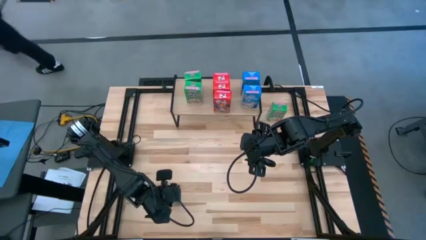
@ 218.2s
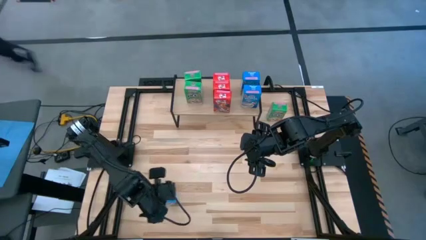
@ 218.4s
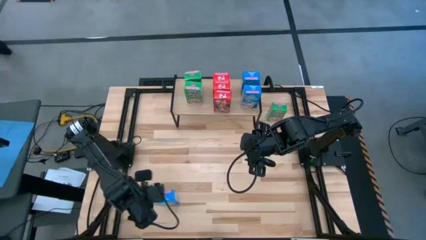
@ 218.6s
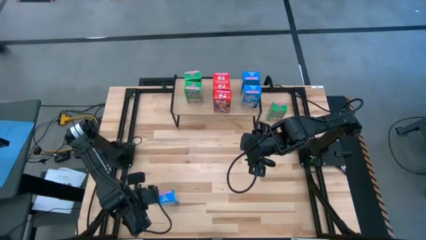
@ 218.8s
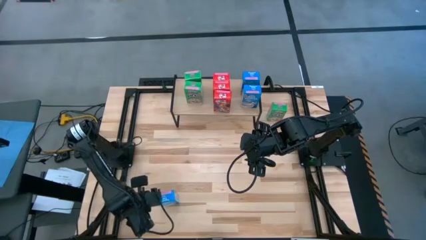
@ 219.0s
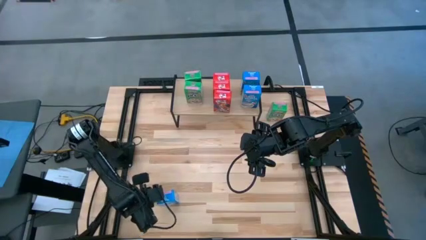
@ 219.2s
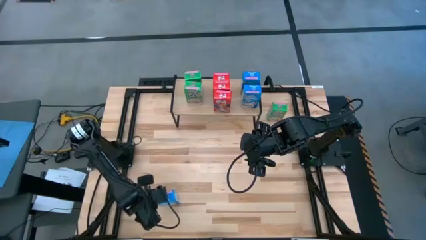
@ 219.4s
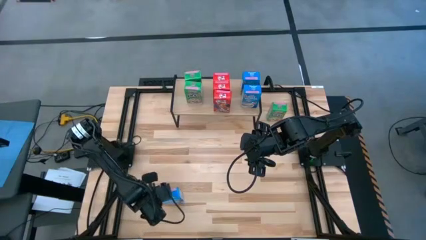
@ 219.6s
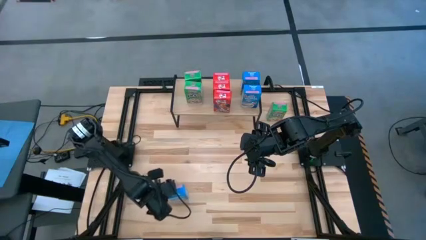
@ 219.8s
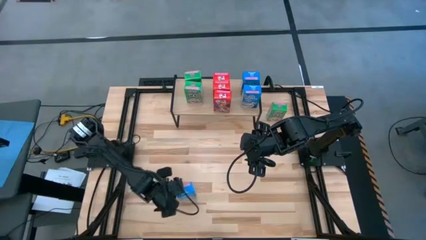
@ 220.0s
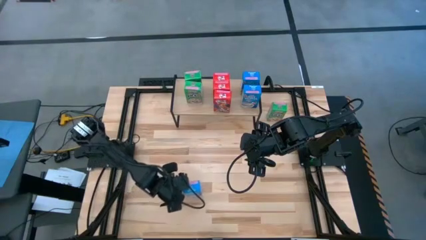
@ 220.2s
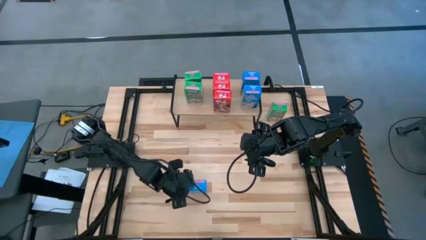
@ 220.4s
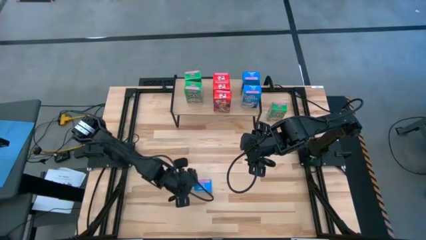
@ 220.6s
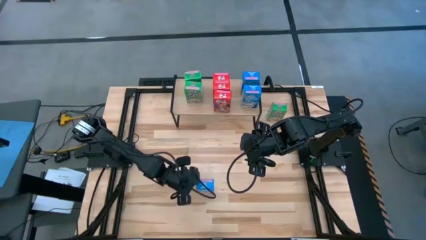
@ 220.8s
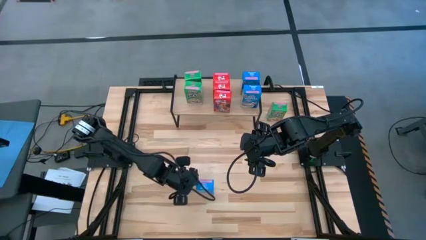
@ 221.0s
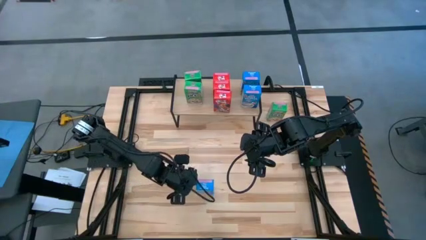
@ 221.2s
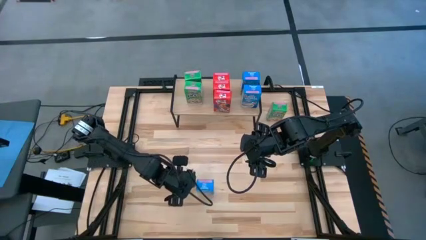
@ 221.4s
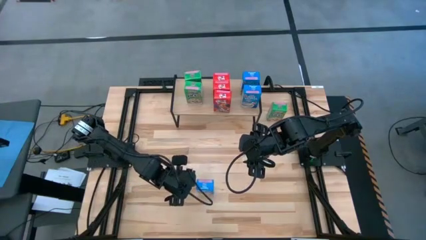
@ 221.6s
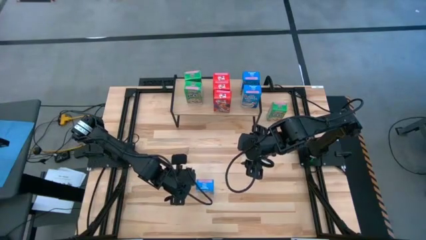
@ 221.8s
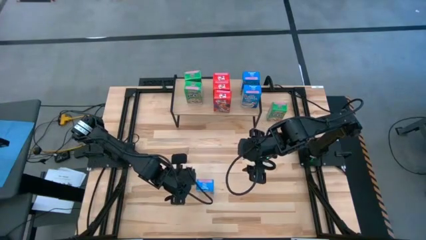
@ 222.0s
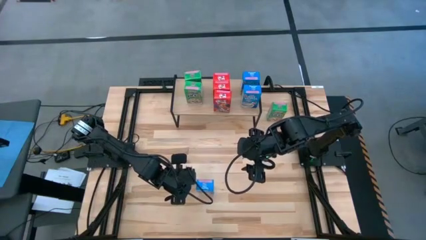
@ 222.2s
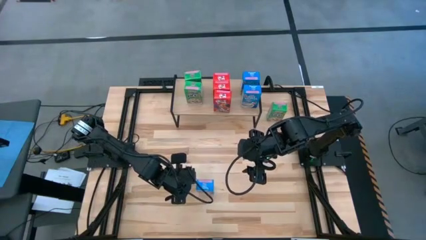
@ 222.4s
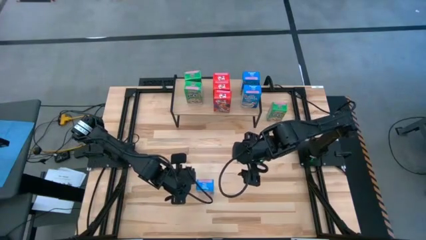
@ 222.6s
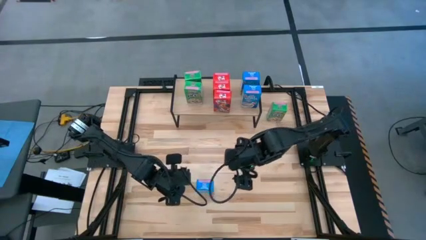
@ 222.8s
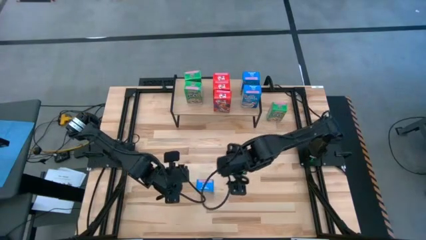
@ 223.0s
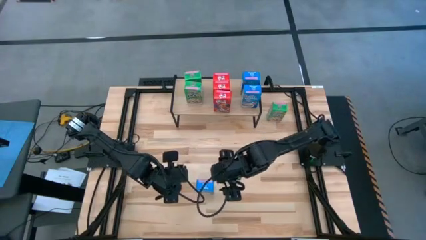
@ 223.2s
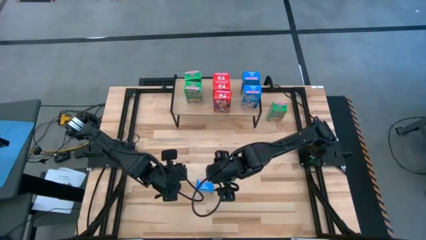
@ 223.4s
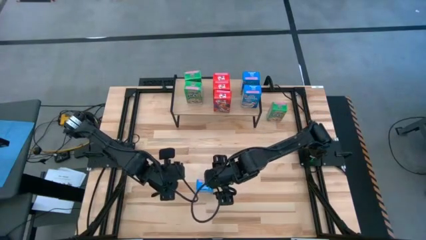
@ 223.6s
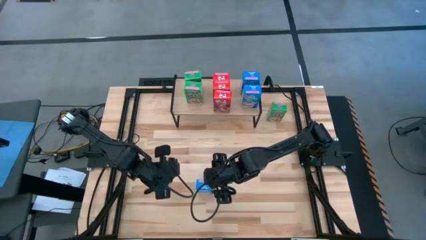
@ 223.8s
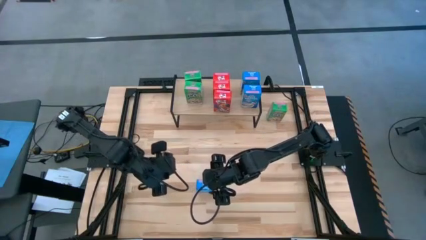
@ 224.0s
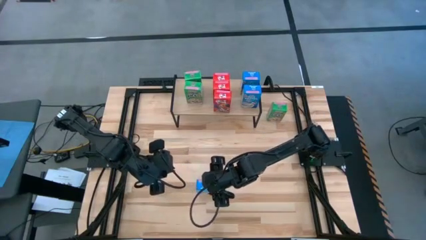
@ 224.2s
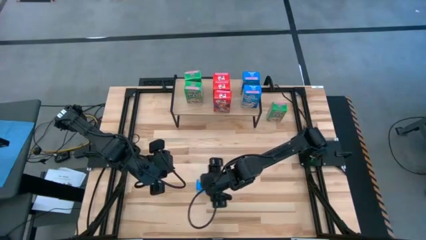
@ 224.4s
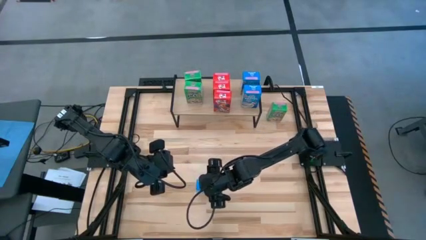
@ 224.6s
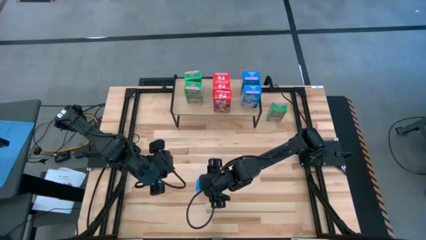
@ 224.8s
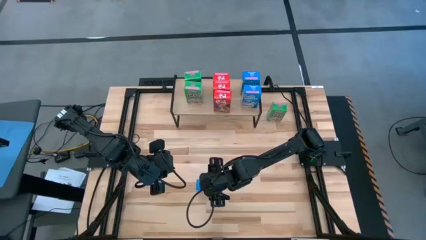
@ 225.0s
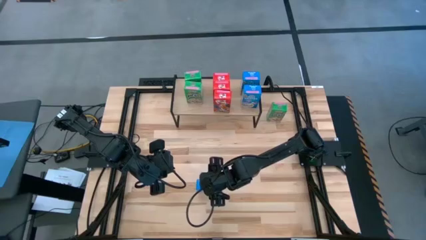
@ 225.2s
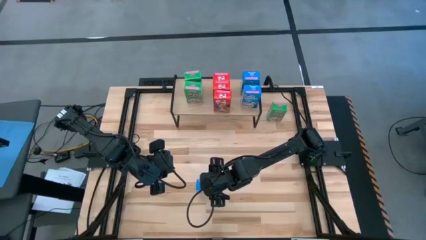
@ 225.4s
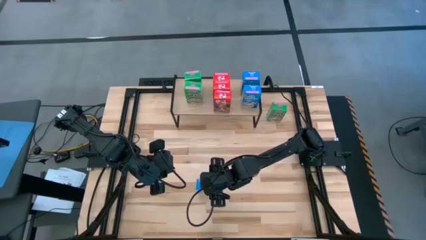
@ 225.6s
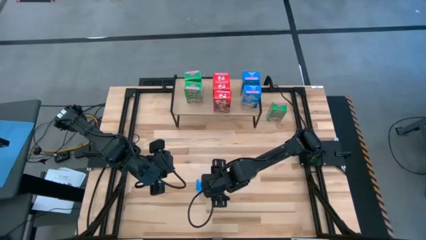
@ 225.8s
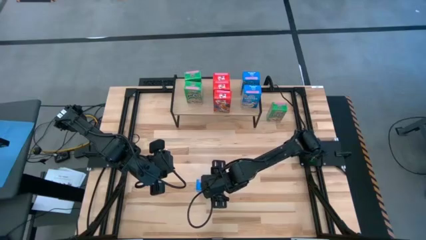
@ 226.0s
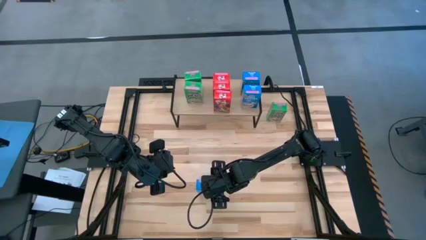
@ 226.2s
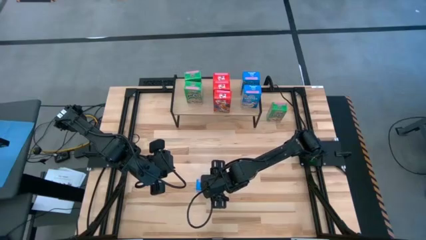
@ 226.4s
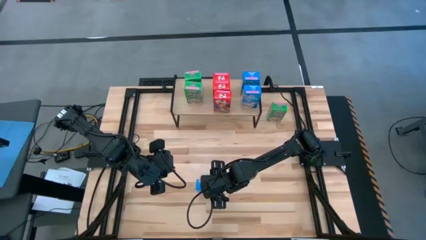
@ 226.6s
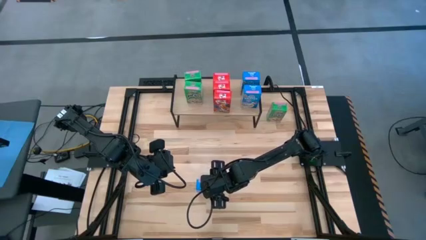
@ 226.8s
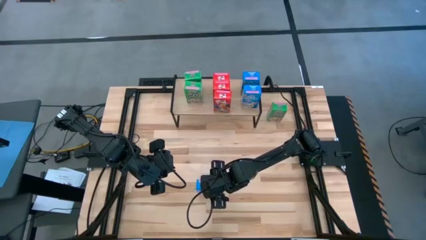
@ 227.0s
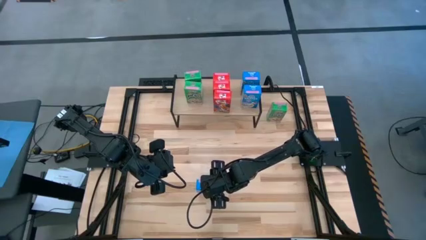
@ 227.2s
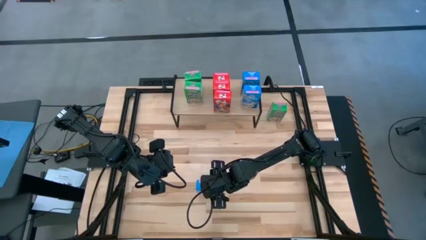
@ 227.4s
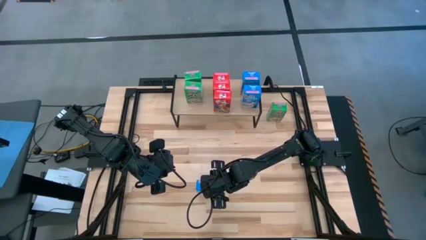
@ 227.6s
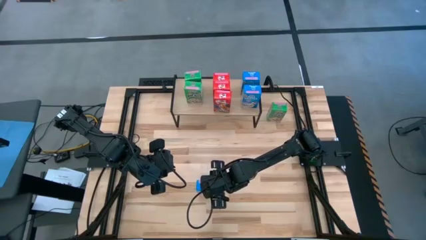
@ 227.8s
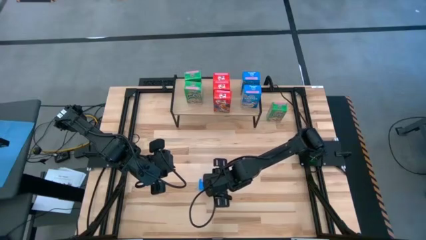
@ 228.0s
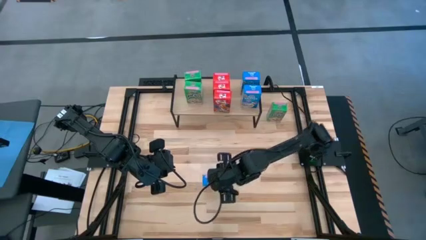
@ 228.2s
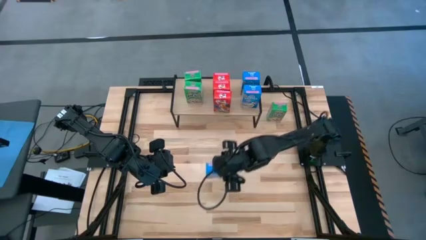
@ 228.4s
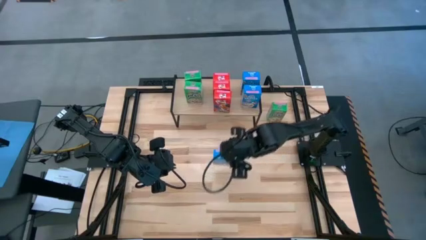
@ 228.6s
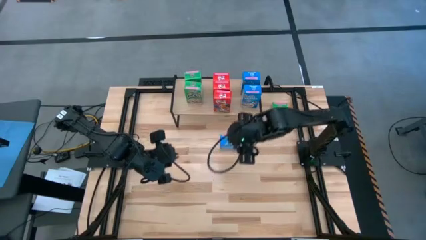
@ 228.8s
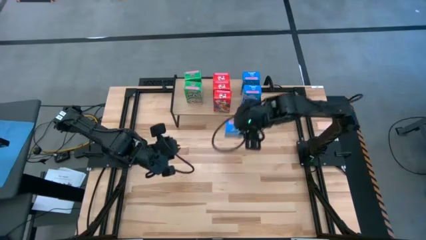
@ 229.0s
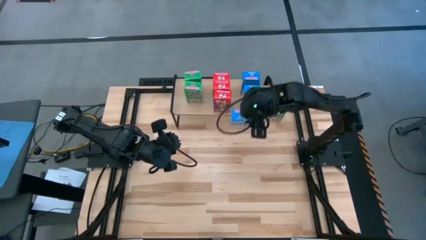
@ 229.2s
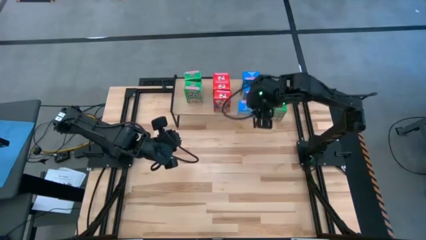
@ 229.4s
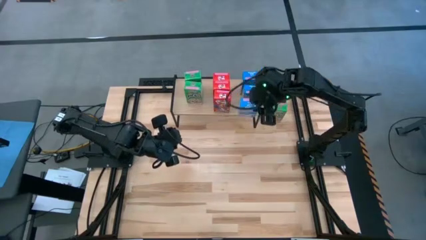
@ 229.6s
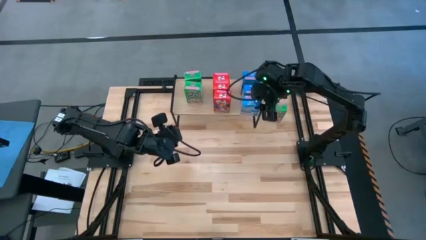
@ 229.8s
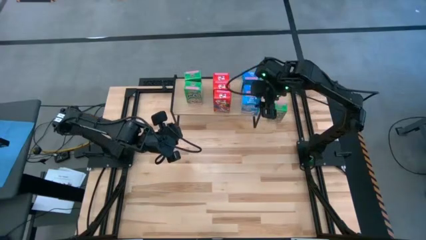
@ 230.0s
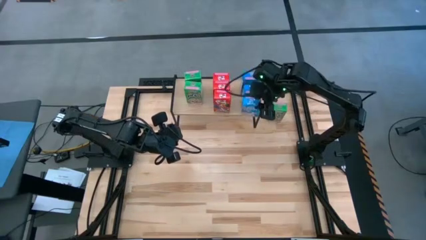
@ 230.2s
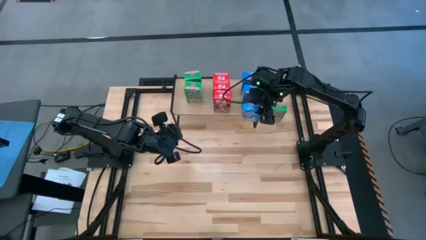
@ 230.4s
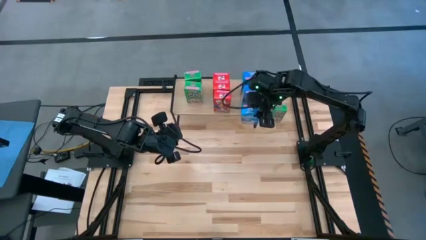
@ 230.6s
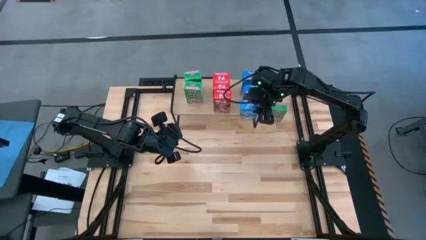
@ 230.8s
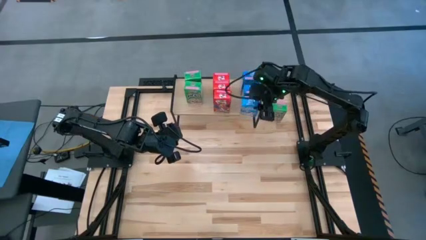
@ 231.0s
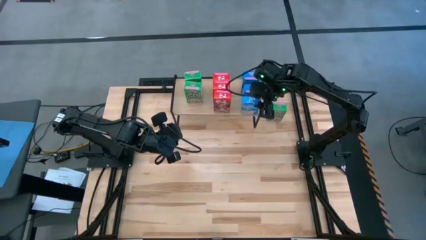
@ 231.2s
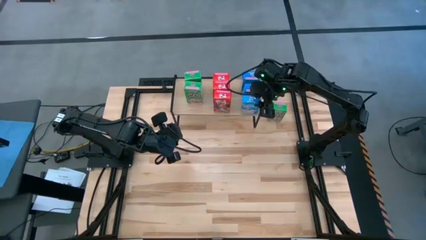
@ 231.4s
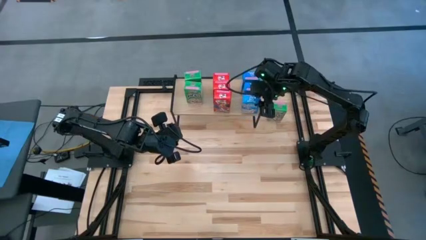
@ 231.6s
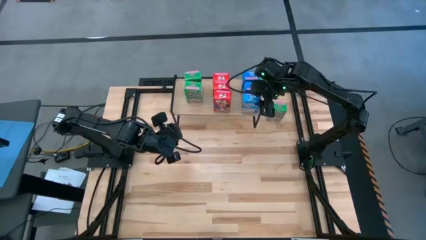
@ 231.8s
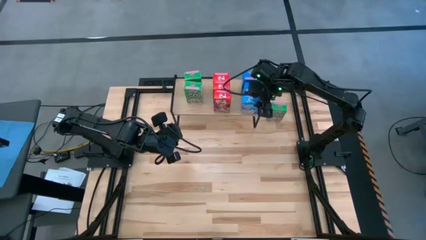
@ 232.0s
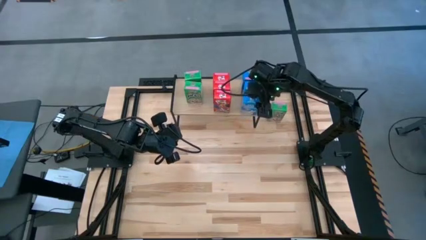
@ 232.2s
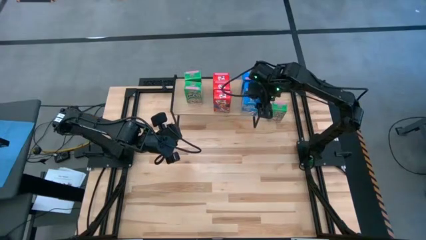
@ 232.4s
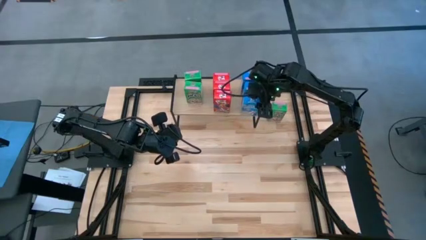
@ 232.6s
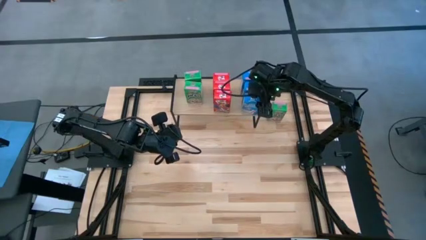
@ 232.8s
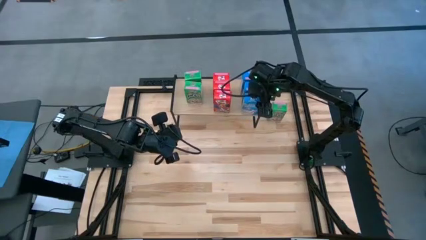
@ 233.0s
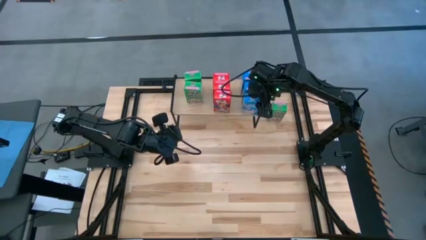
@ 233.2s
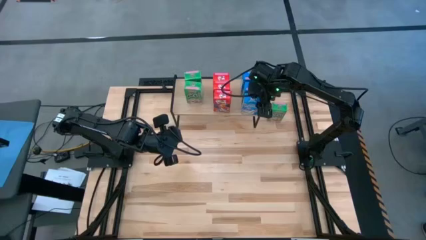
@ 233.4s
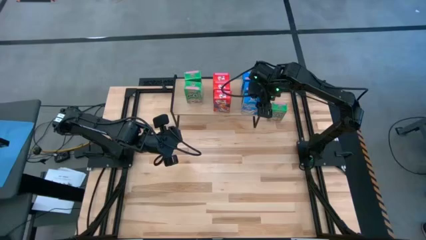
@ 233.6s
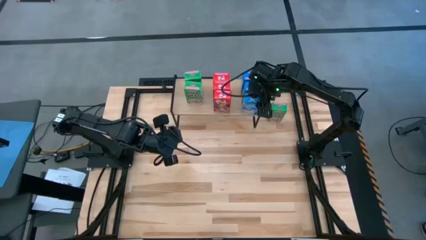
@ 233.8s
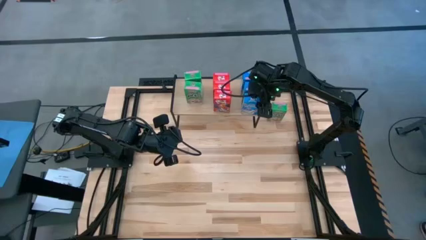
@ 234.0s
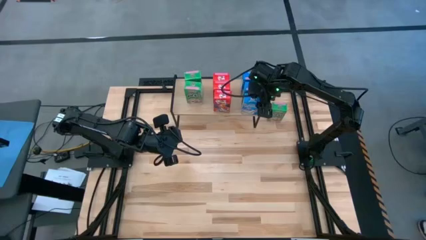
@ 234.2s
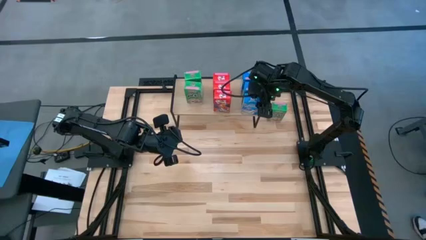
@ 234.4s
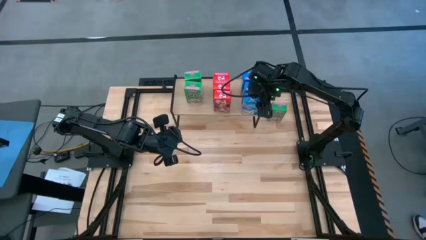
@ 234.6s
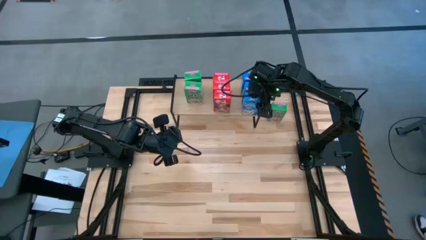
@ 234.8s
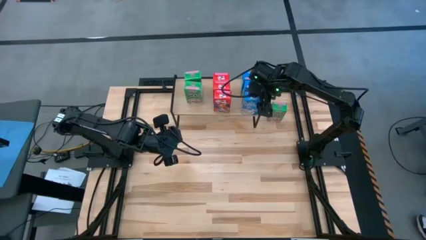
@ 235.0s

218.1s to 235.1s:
Task: Stack cereal on shelf
Put the blue cereal box on the shelf aligned with the other blue cereal boxes
